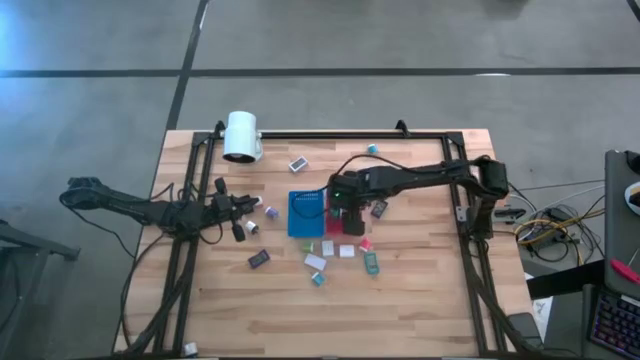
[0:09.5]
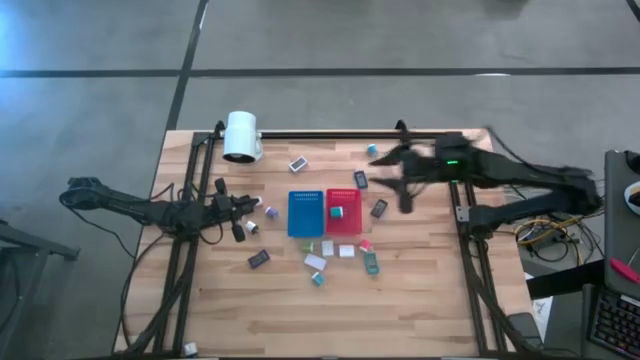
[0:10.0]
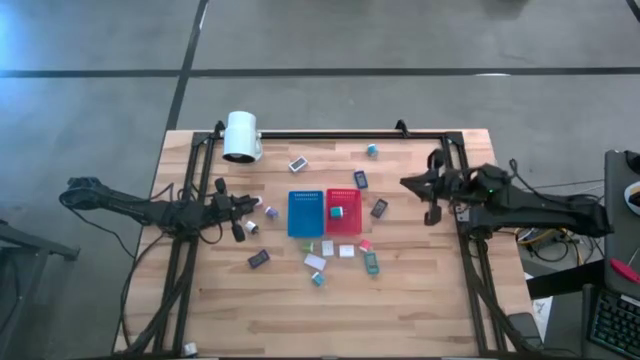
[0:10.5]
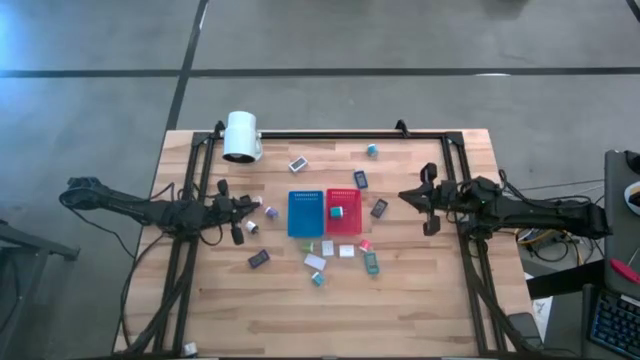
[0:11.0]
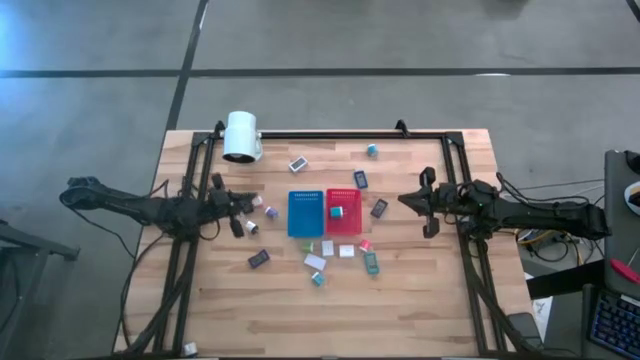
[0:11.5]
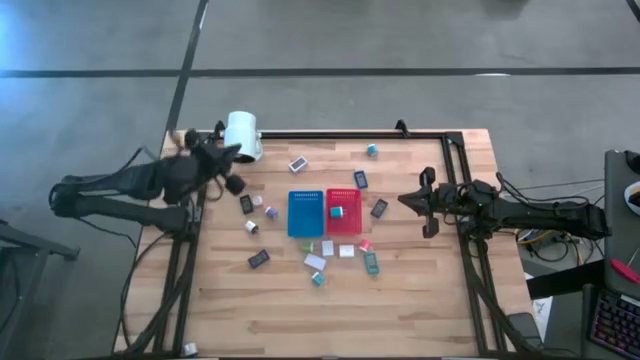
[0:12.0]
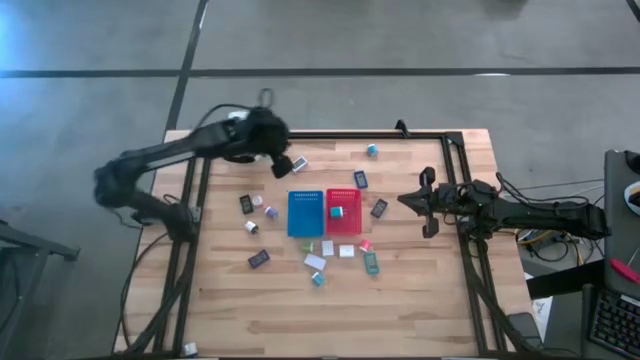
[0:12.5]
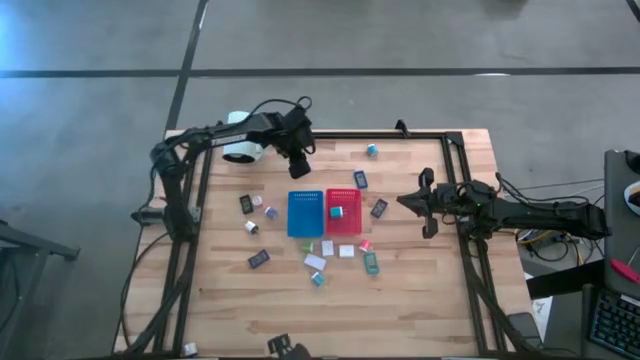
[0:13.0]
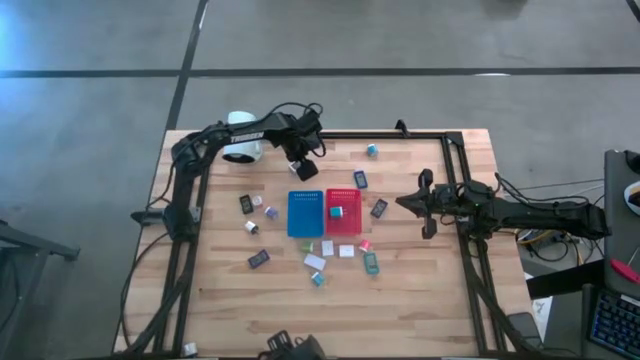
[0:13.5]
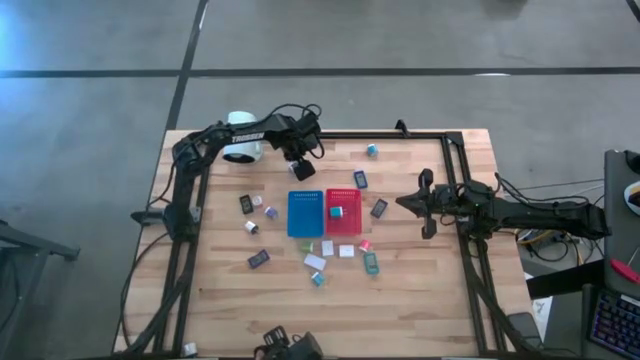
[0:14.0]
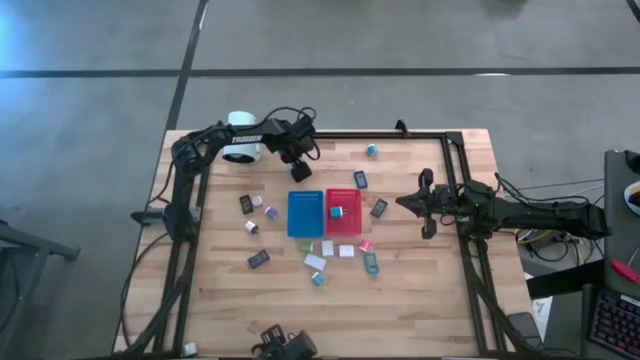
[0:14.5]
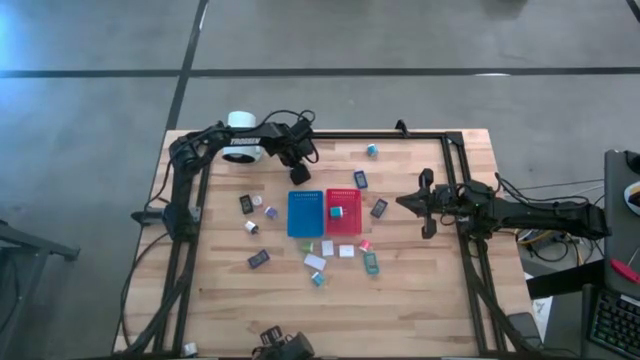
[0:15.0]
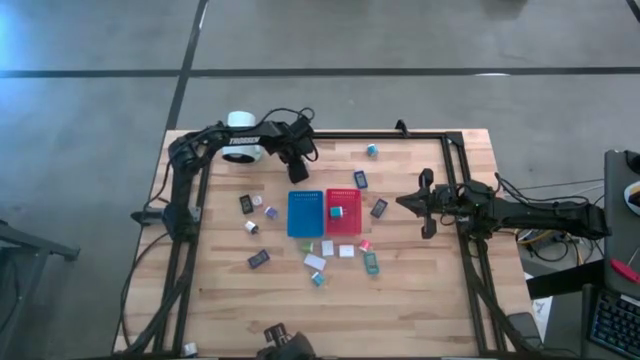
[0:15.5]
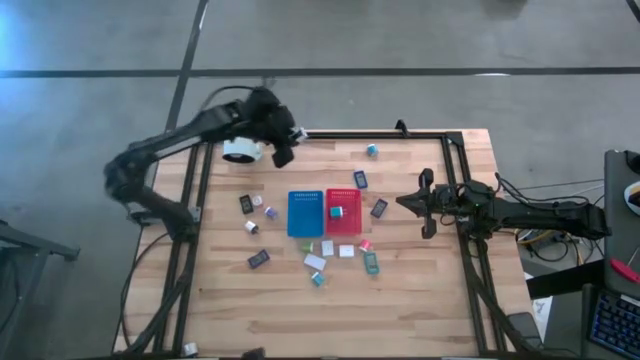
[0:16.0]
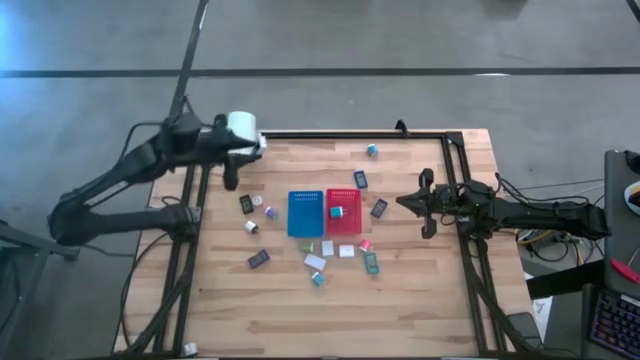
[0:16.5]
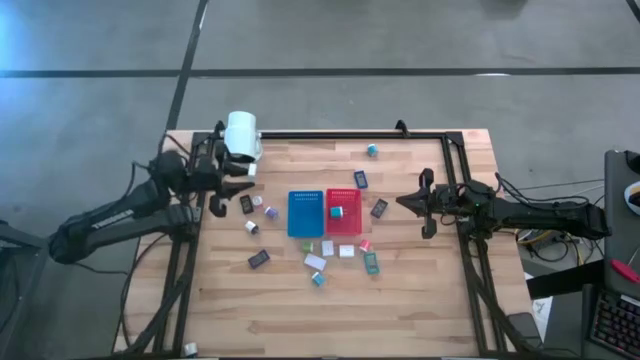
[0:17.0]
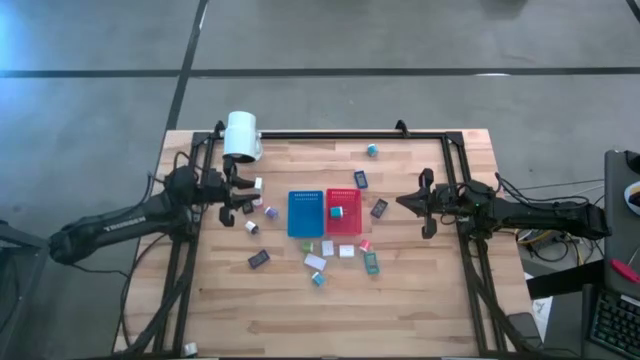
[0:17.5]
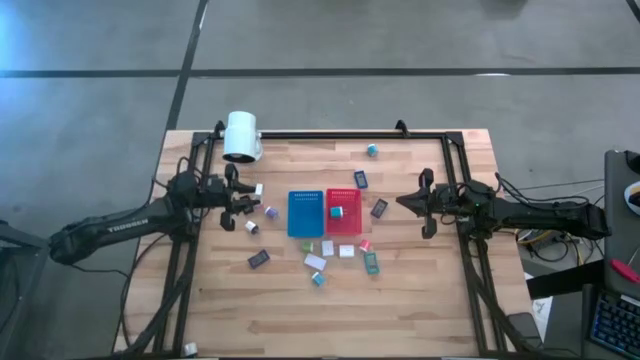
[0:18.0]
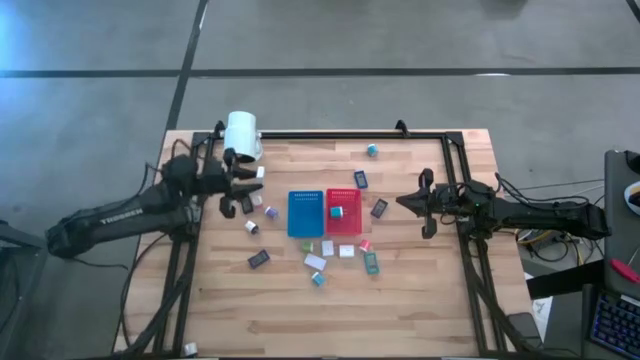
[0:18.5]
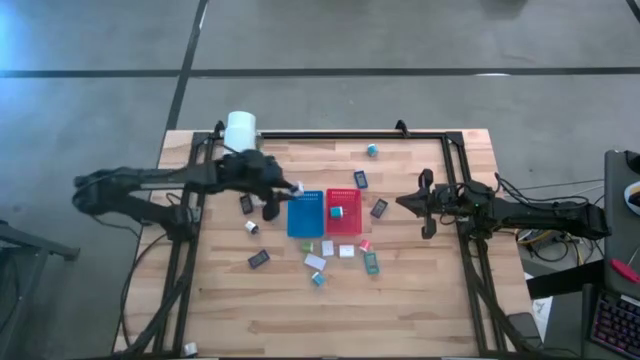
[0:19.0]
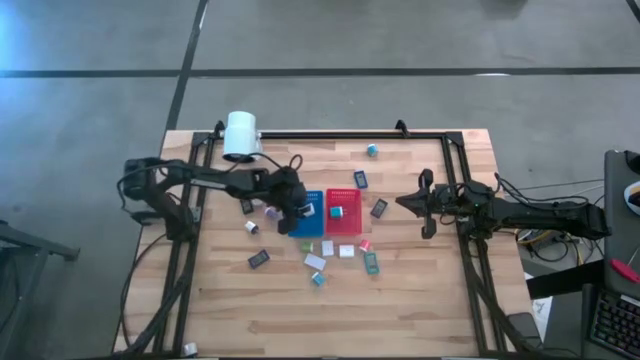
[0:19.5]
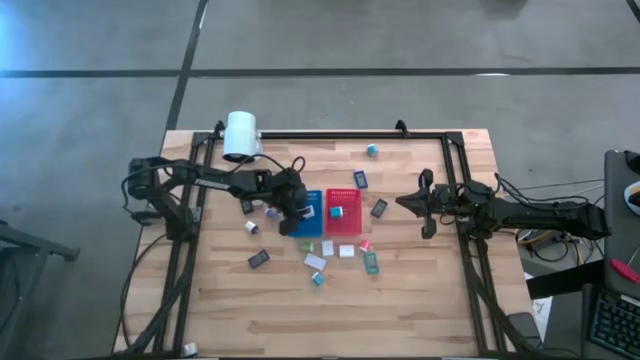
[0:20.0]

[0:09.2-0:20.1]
Task: Pick & Place Office items
Put the white digital timer into the blue bin

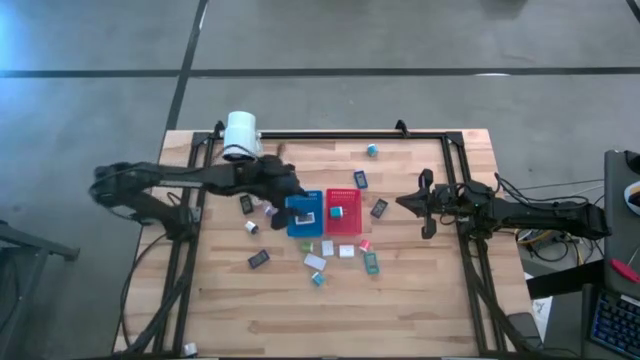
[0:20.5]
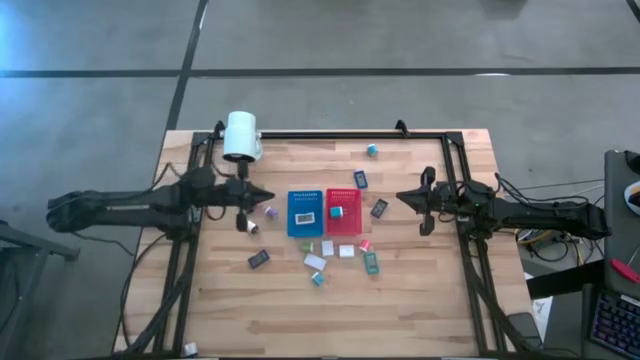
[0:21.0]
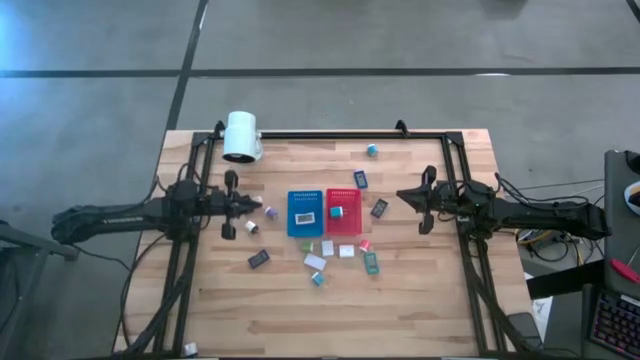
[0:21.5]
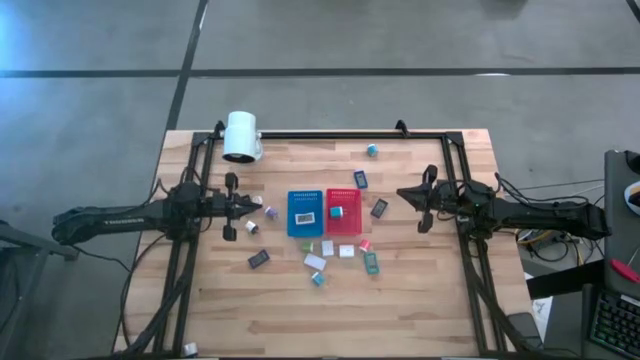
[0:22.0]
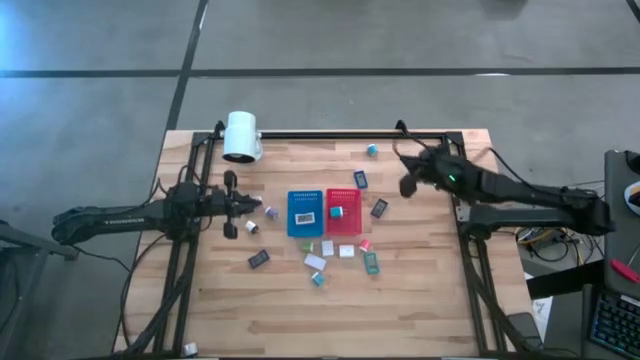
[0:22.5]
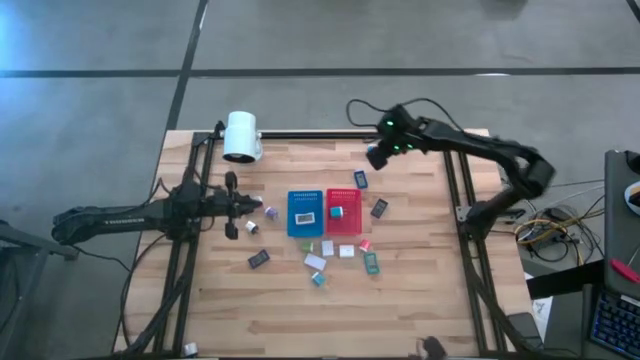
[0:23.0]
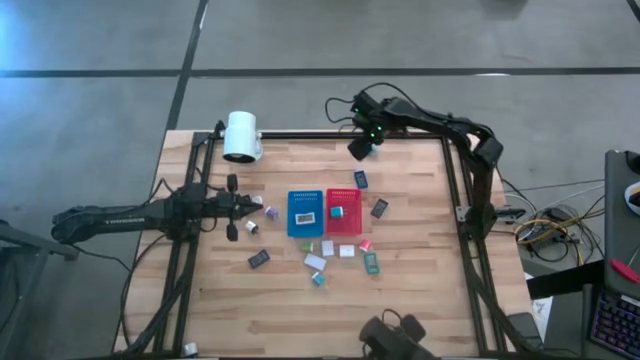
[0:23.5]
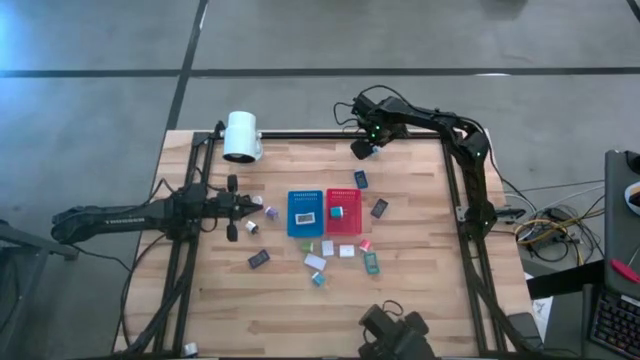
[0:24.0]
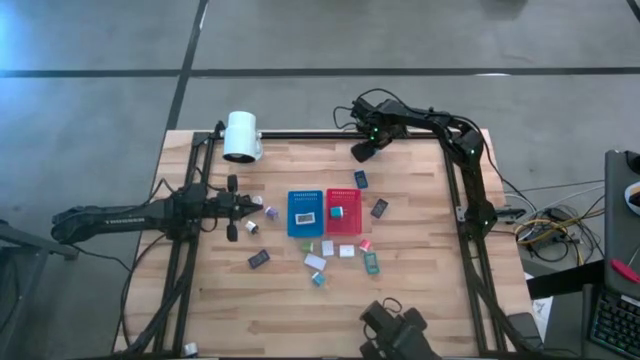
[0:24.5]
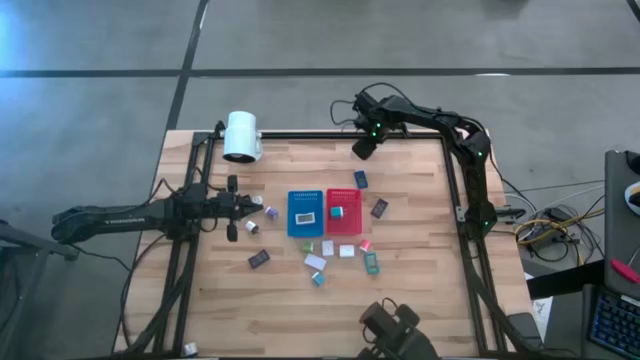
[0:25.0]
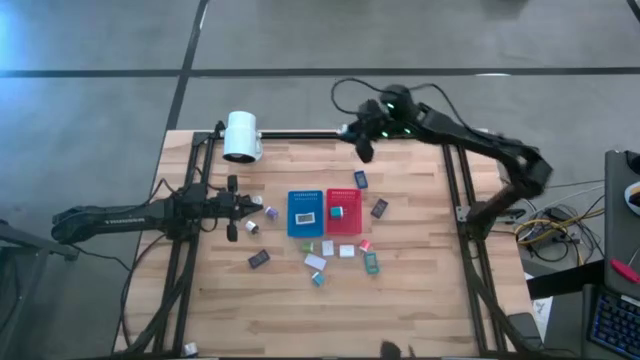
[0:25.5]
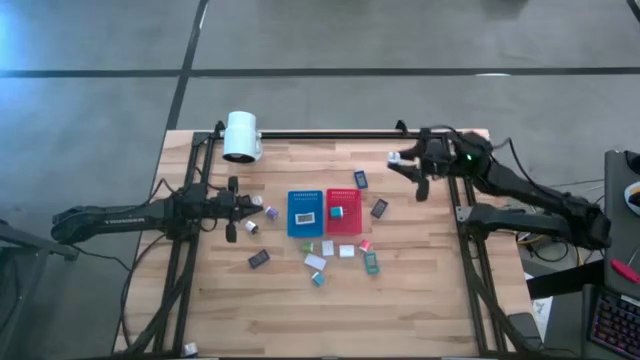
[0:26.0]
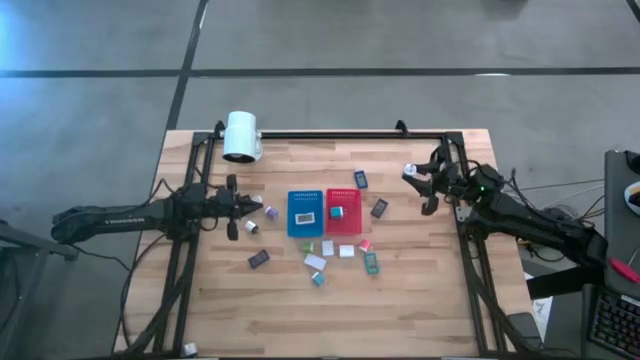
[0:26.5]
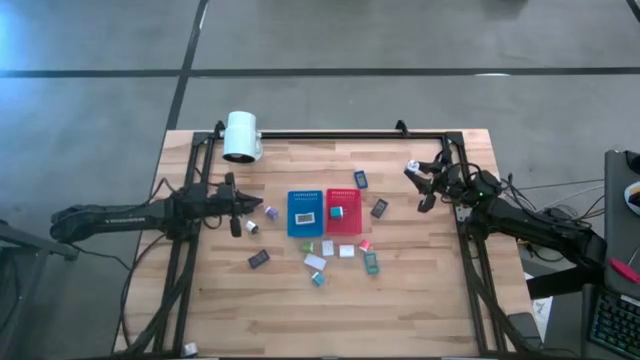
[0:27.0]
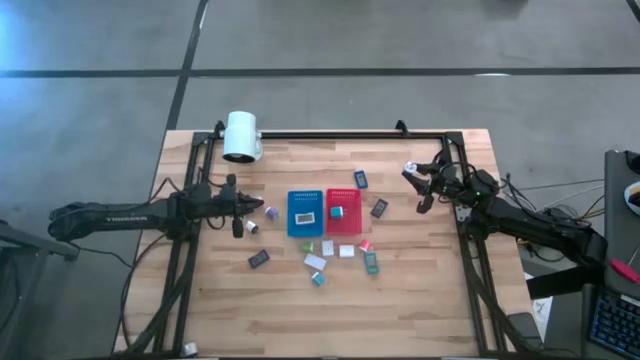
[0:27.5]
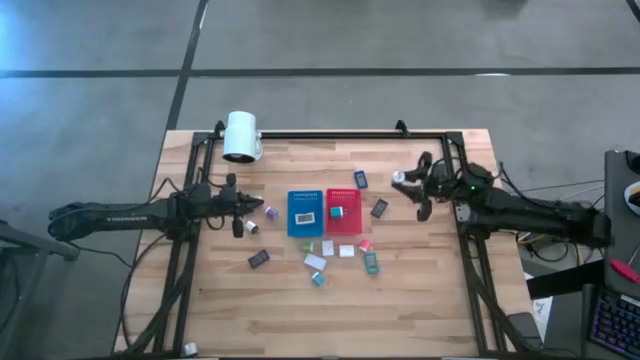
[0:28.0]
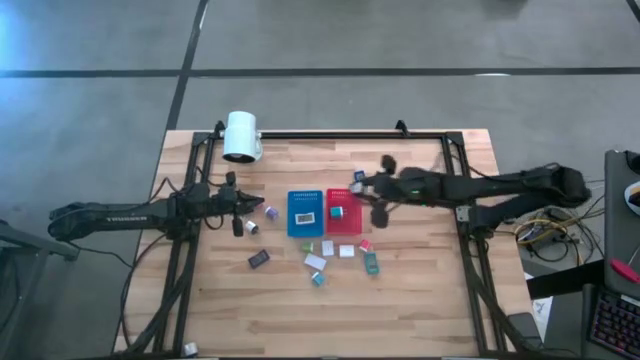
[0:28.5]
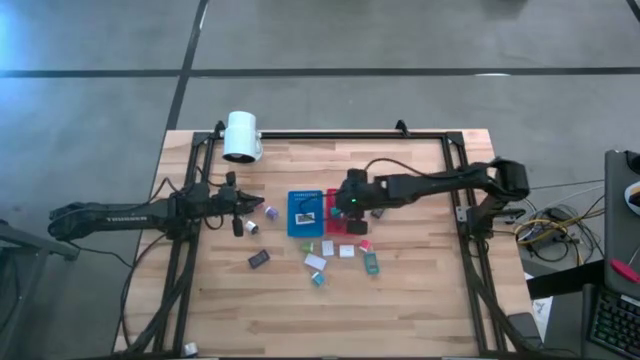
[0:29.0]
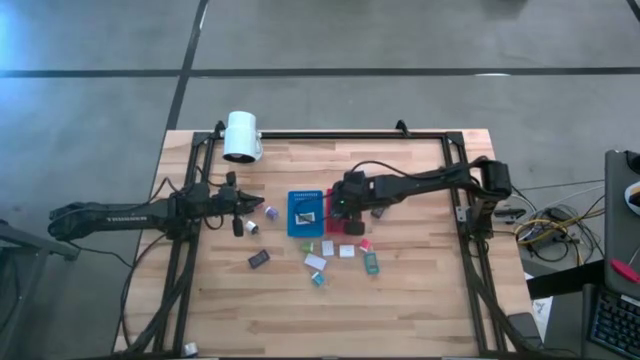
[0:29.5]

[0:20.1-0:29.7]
Put the blue charger adapter into the red bin
